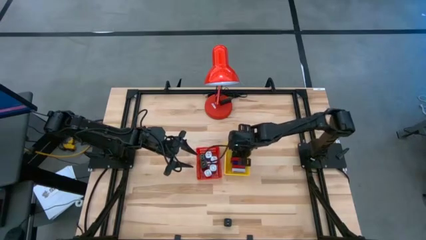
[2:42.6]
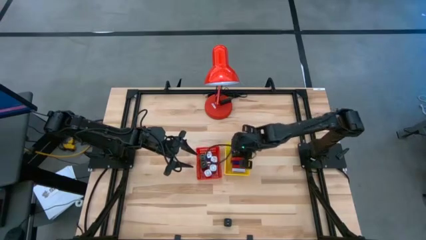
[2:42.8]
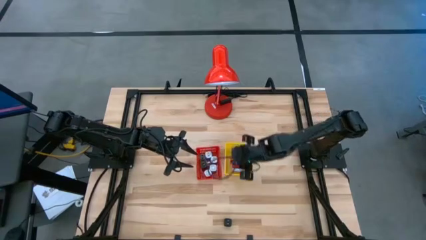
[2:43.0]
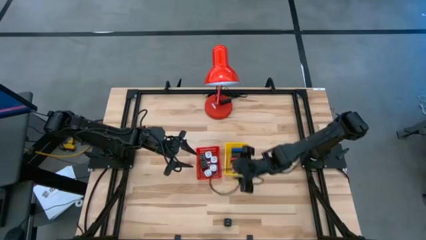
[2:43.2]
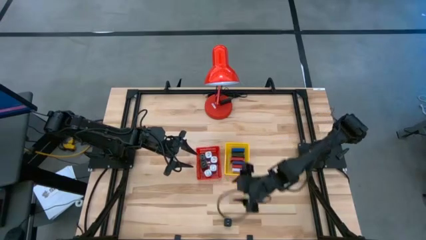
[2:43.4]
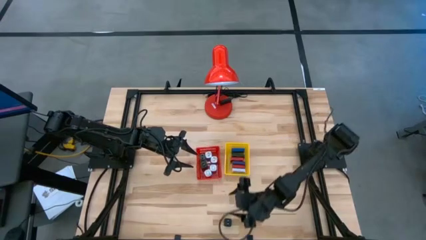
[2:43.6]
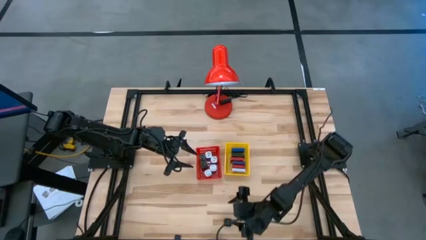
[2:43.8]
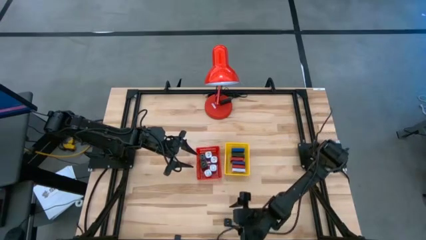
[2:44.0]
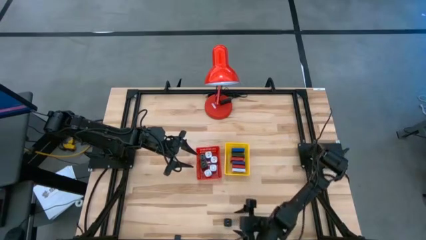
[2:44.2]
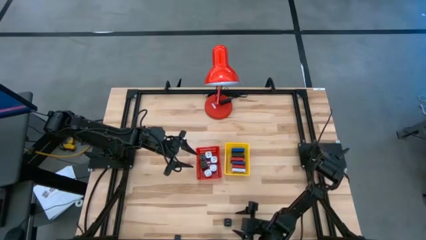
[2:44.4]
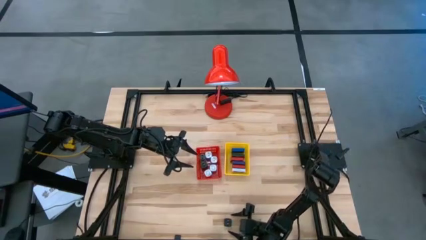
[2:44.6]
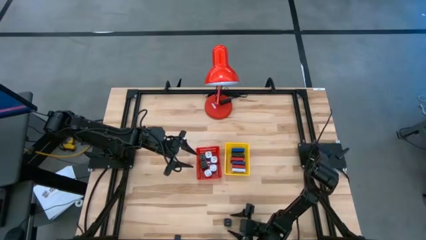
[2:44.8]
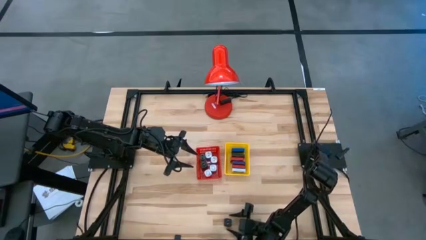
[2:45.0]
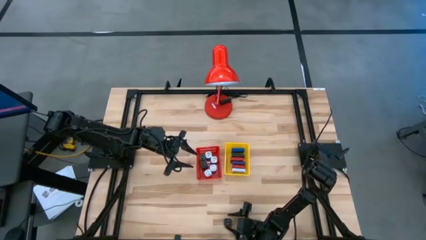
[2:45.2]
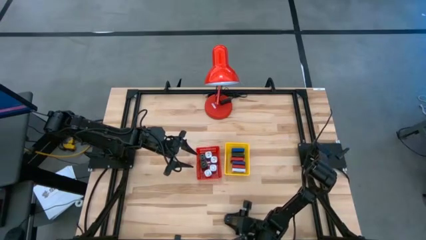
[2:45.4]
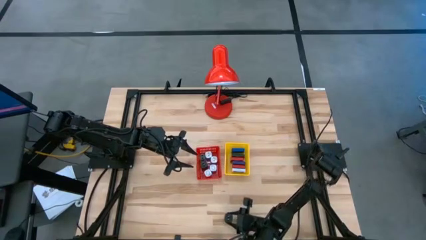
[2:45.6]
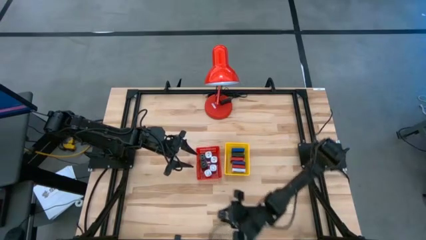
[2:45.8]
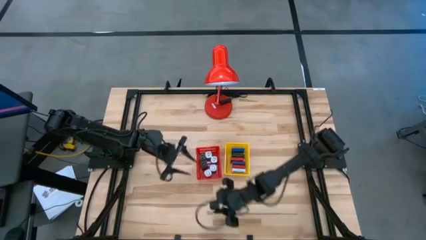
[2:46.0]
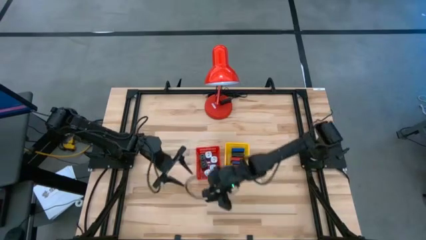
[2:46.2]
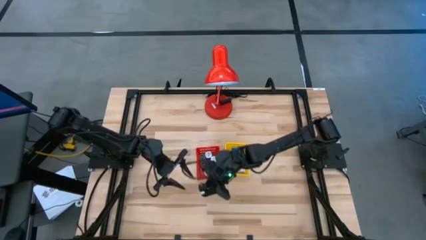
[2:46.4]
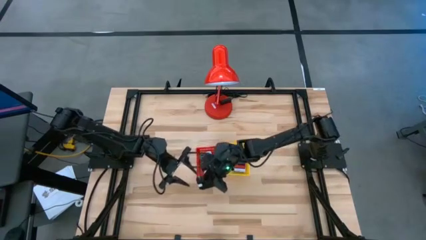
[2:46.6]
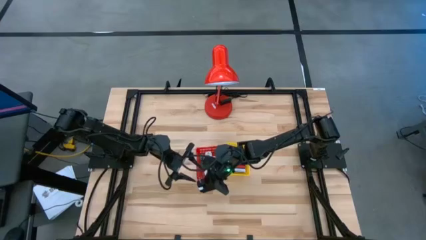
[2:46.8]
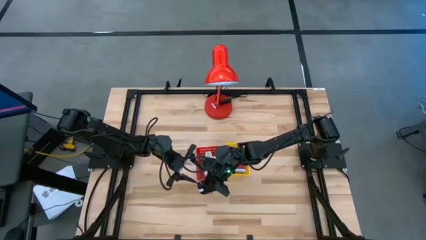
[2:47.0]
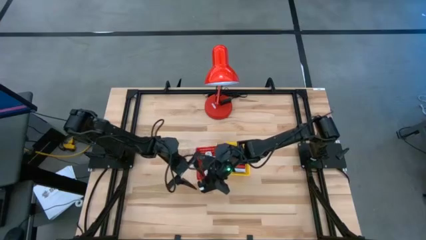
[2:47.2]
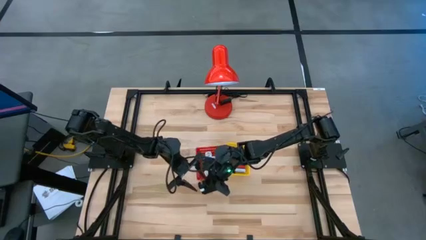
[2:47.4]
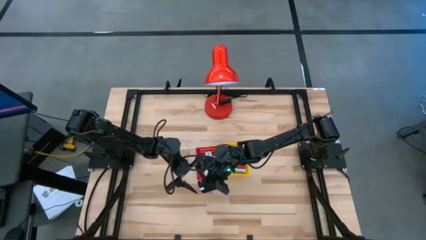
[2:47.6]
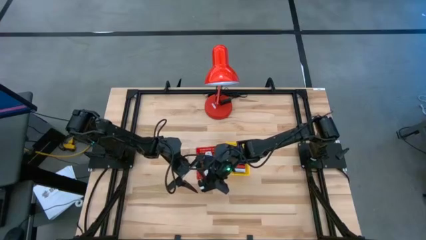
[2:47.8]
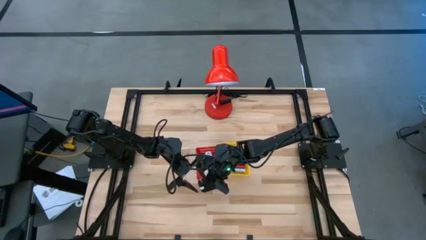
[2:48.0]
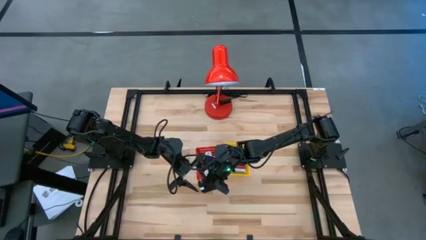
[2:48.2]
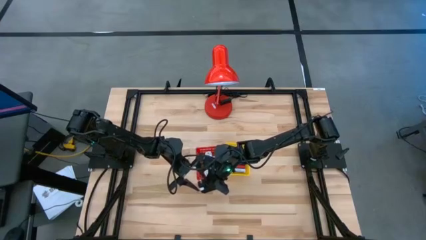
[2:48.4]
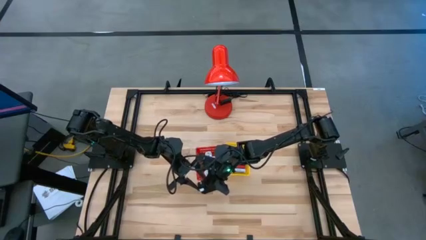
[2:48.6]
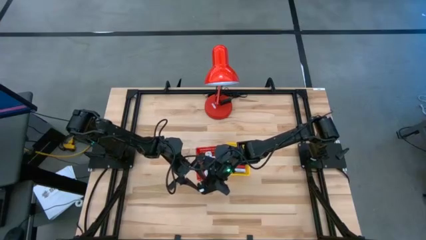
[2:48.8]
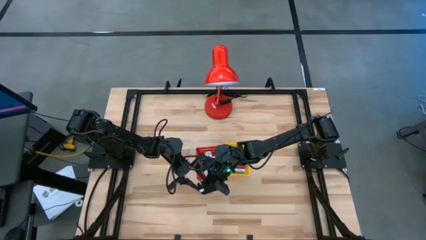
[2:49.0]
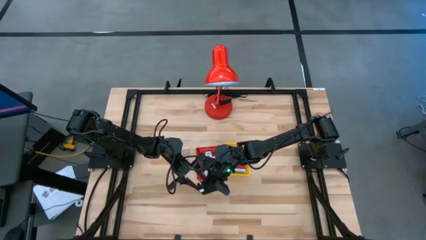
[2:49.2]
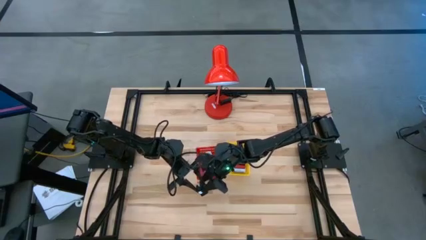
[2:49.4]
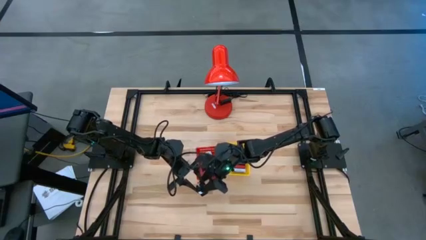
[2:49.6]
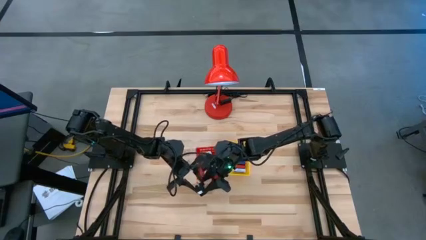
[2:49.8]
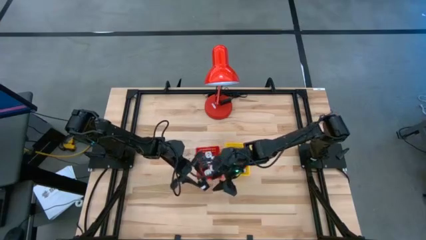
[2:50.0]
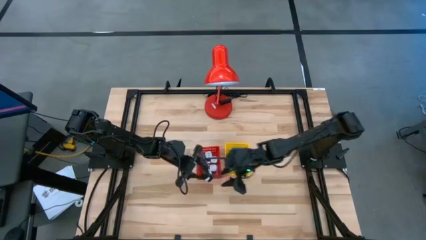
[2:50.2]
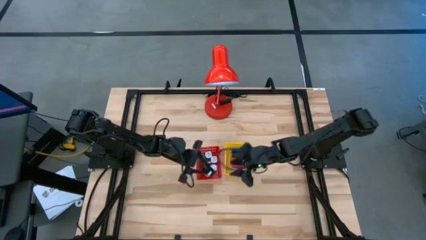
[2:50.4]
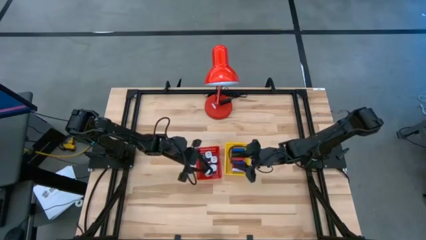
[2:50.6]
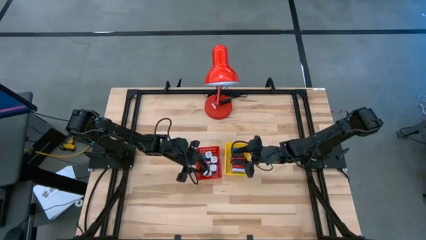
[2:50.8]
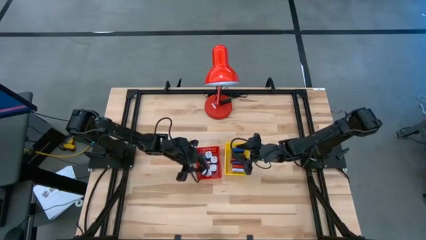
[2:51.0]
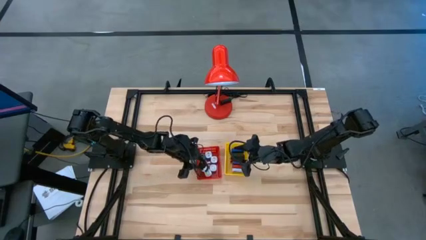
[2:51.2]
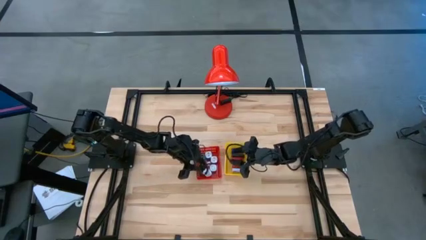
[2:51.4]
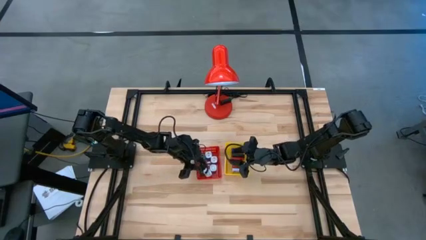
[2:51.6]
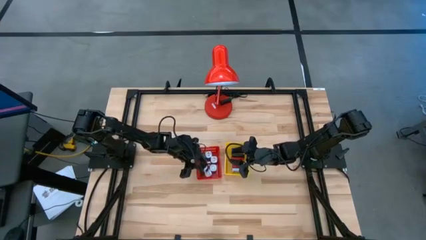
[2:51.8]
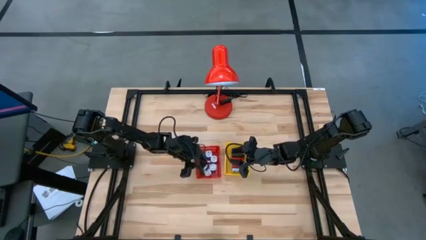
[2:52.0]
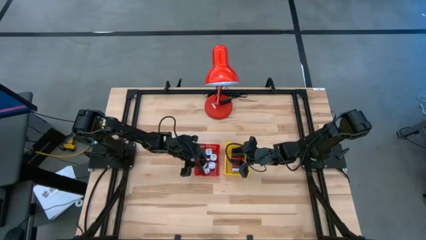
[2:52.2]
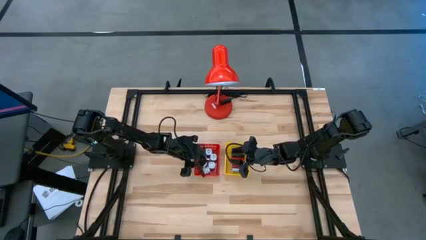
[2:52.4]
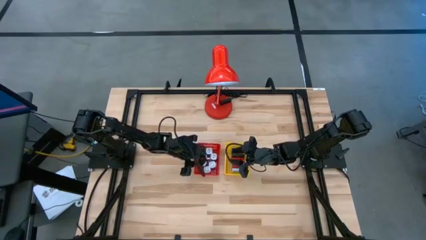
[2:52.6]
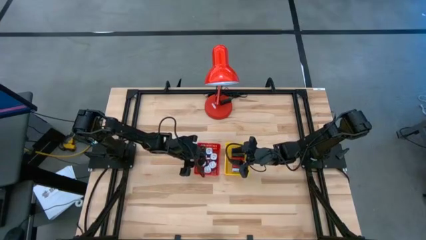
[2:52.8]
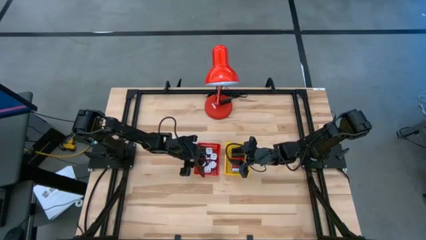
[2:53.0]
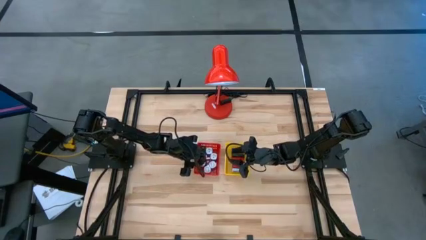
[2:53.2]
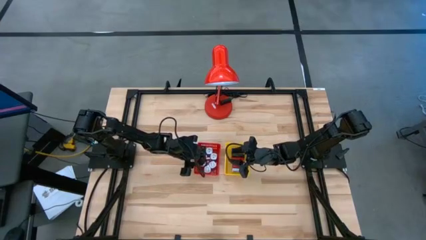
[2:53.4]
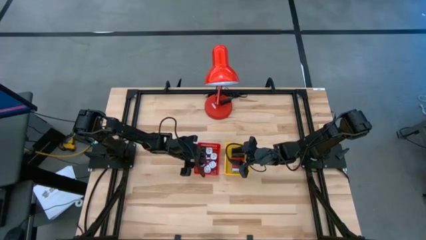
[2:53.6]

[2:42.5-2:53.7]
Task: Pick & Place Office items
Put the black charger adapter into the red bin

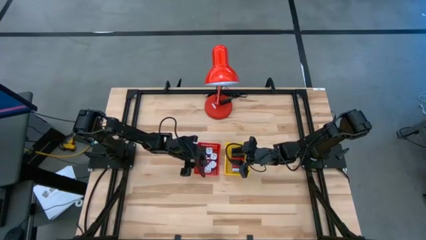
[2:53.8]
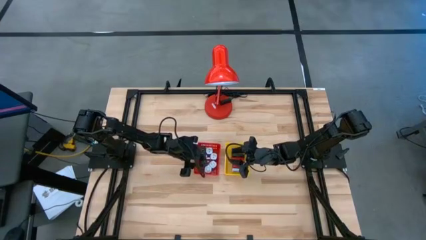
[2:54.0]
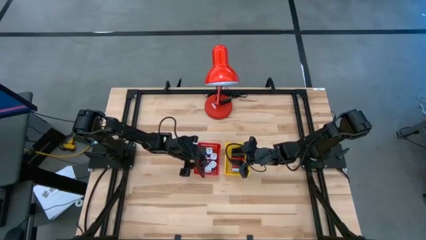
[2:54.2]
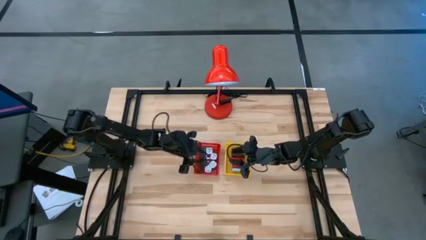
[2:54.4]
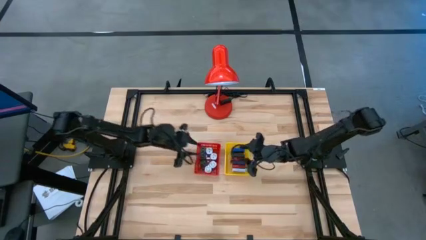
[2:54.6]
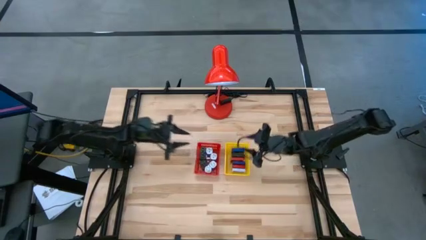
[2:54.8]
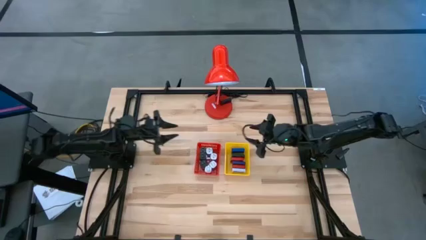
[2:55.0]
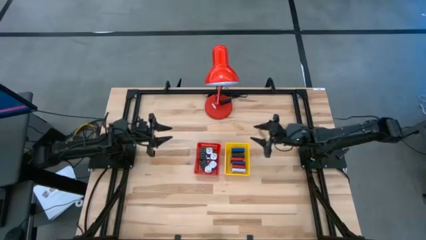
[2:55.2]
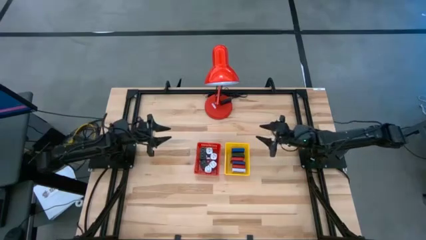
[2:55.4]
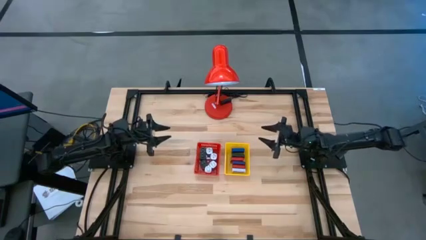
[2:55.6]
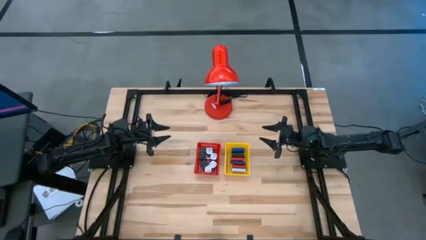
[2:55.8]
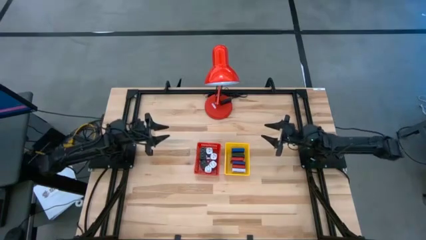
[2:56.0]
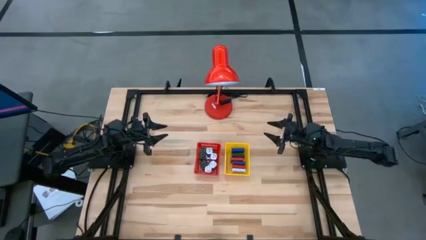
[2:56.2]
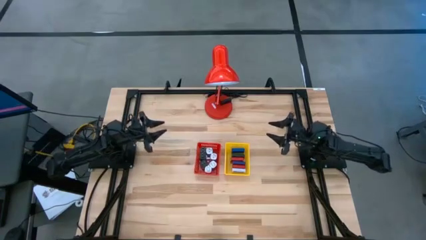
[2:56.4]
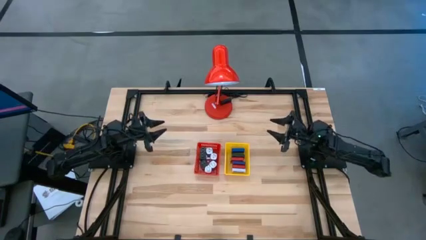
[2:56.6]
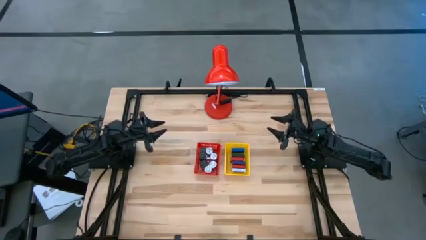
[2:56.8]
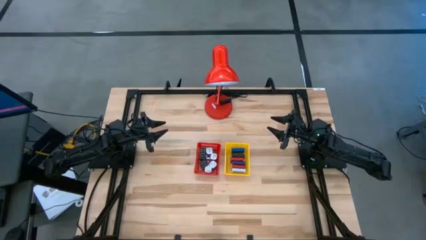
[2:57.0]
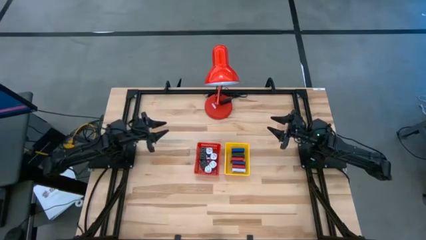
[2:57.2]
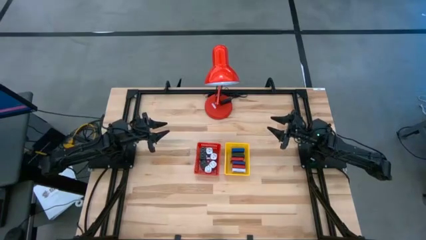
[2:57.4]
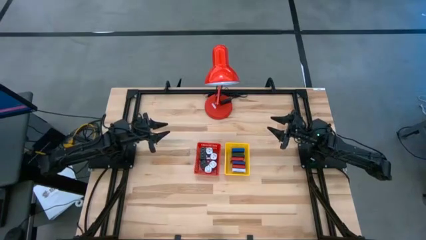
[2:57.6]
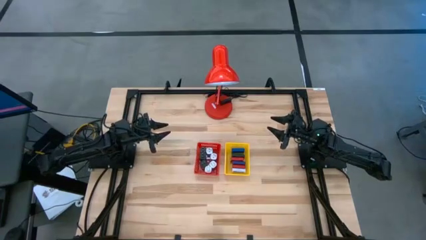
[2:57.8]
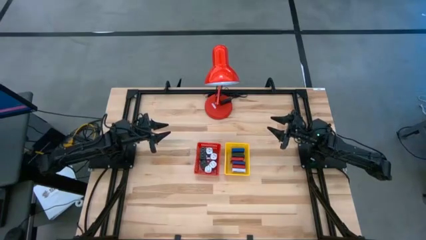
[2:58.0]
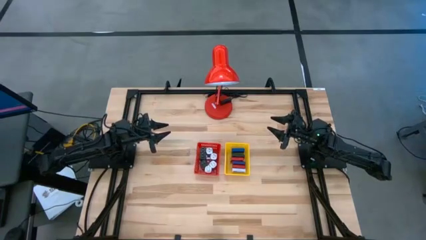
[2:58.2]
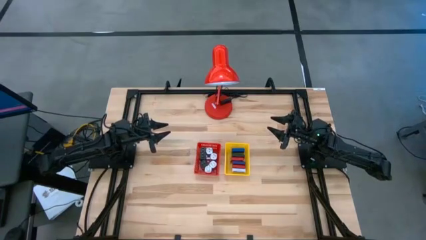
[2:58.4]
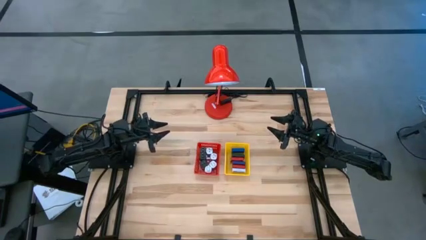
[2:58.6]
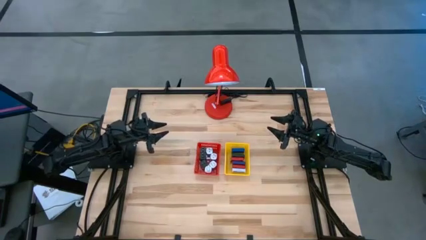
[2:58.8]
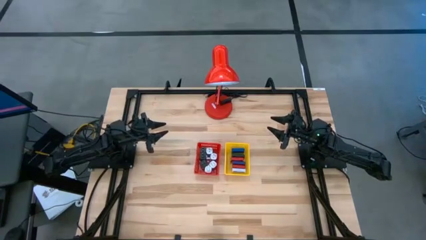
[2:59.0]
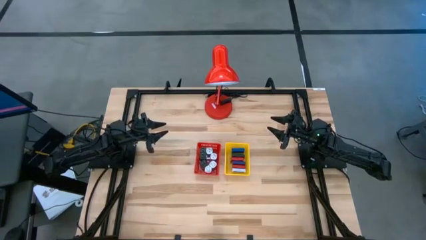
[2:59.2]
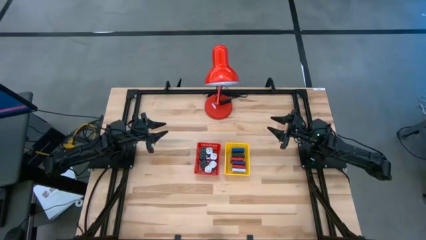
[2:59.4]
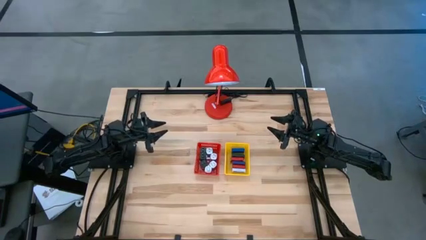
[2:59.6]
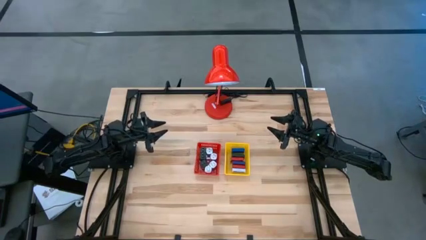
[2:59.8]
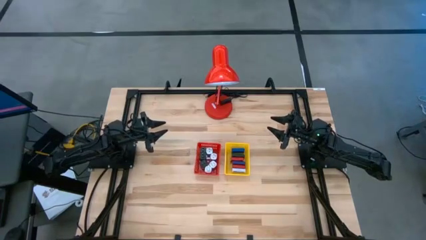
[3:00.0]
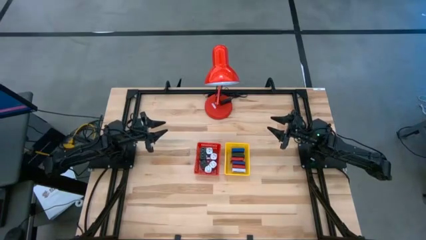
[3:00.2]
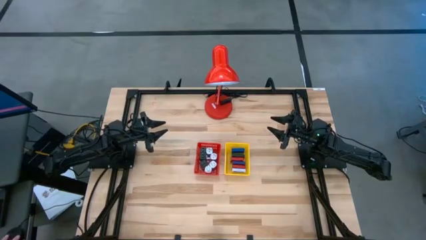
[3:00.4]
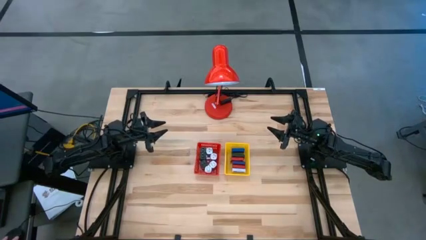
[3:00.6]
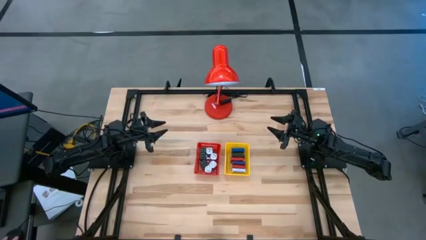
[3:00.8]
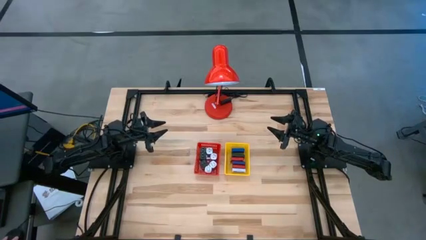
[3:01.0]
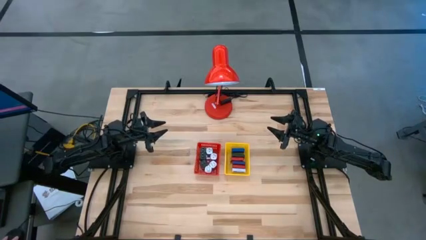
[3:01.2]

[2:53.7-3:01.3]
Return to Home Position
